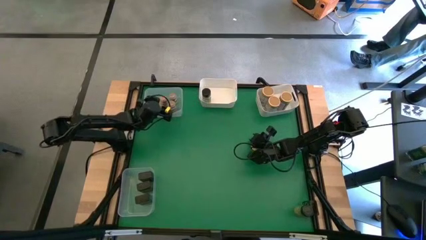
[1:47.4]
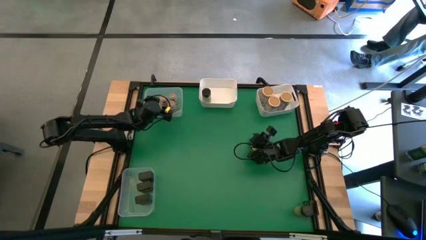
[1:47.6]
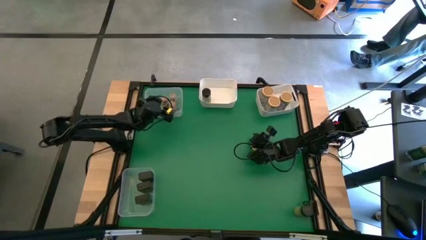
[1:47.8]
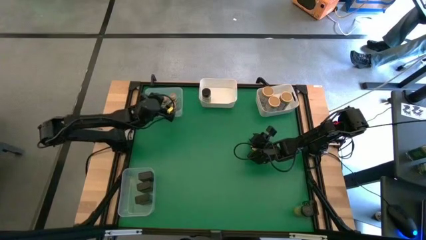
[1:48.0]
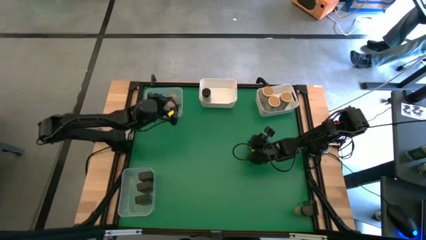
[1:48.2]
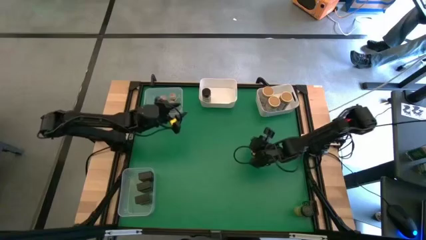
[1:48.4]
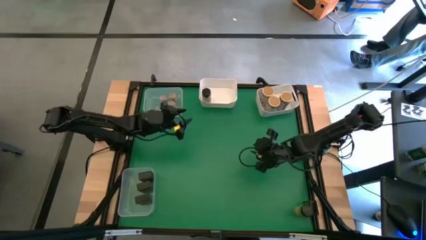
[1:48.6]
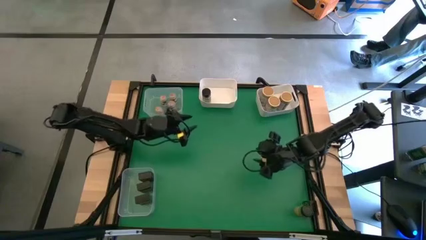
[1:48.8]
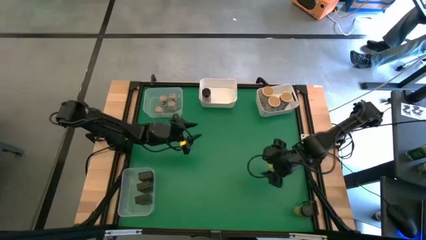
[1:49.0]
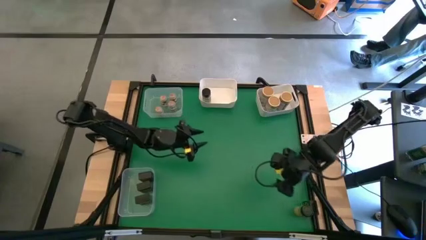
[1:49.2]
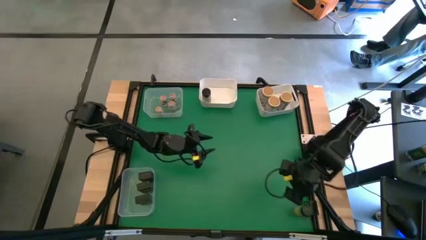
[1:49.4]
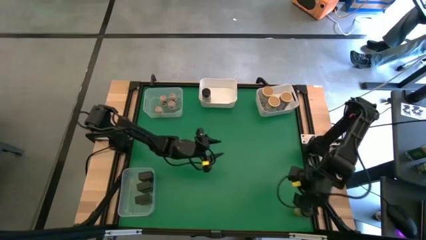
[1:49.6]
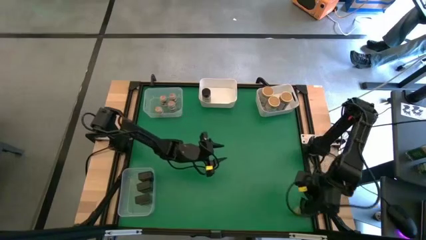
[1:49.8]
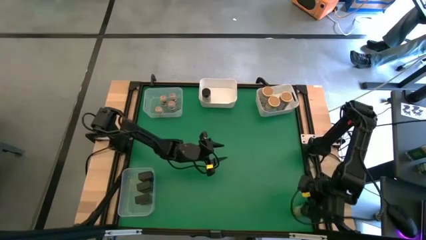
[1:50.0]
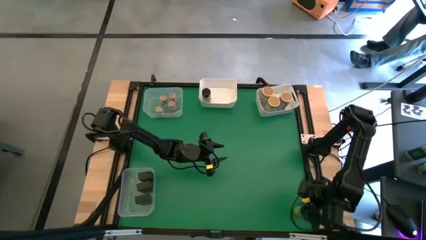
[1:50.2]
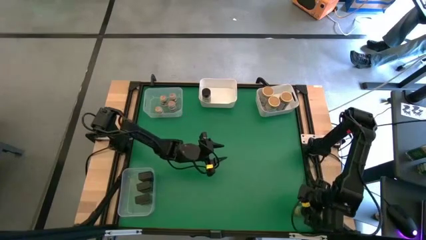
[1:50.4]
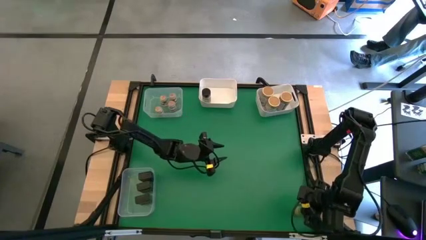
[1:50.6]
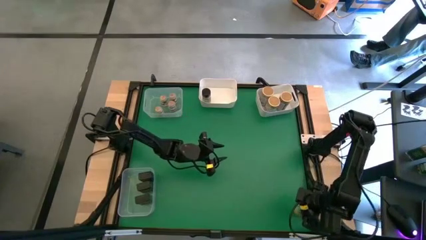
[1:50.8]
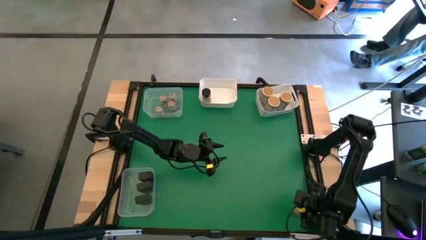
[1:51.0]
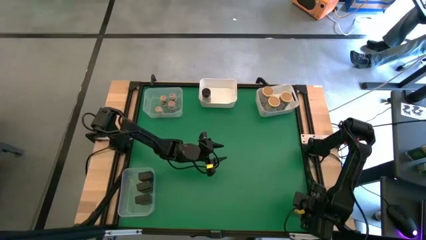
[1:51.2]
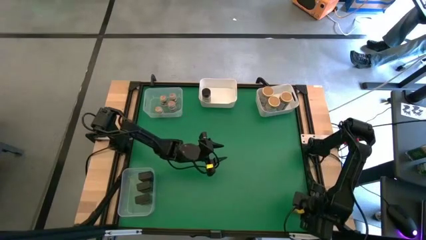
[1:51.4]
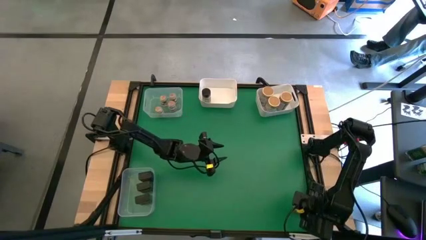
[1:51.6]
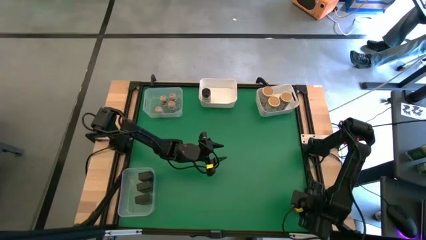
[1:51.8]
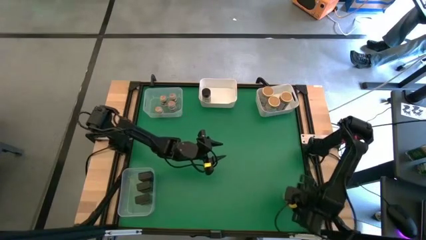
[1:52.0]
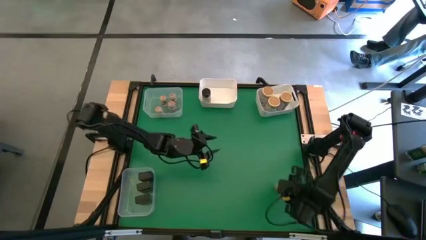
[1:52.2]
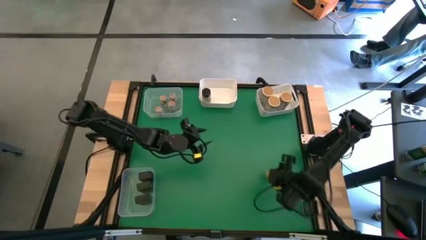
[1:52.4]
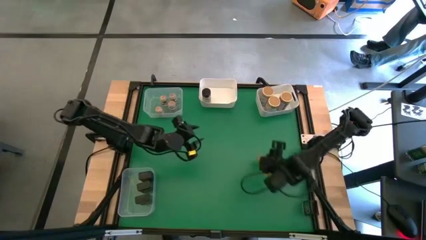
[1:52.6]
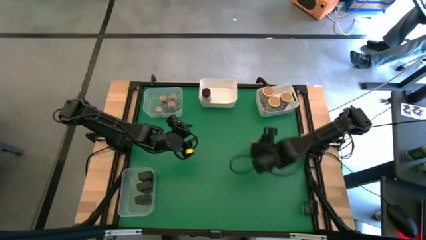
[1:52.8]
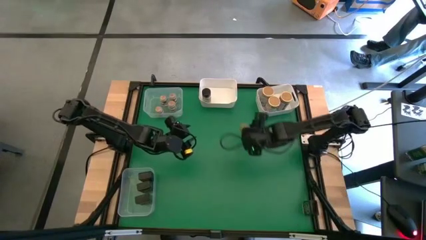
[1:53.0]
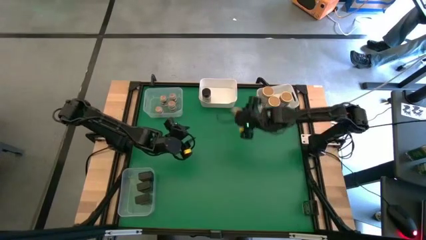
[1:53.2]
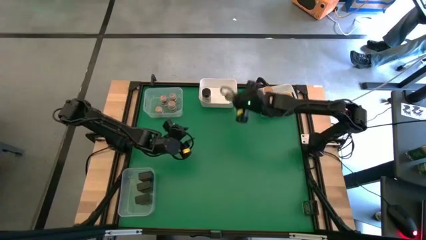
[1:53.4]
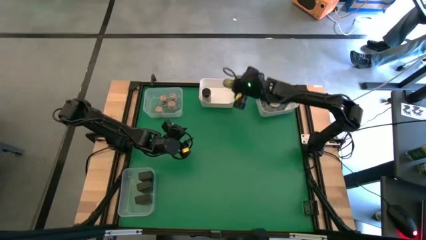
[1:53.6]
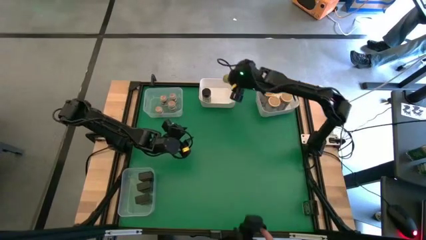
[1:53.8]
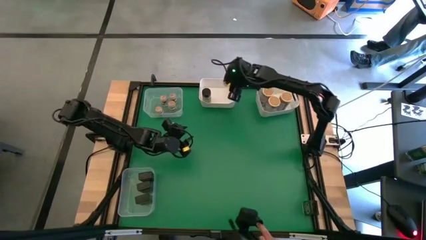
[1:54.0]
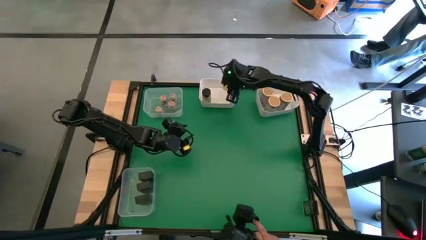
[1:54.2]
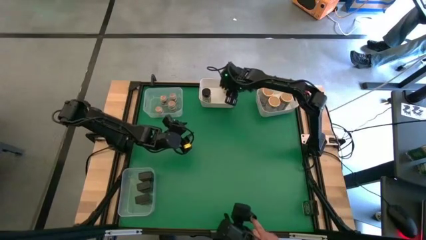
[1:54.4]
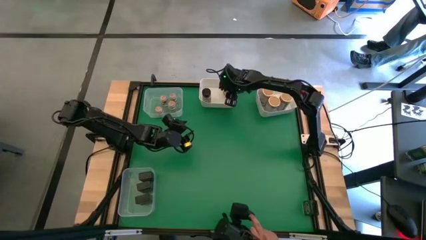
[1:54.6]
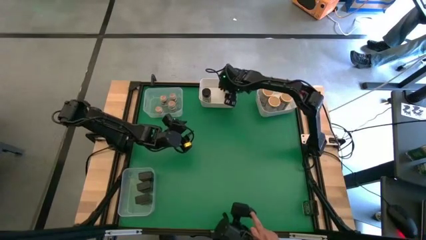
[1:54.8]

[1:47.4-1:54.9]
Task: Sort spices by type
Put the black seasoning bottle into the left white bin

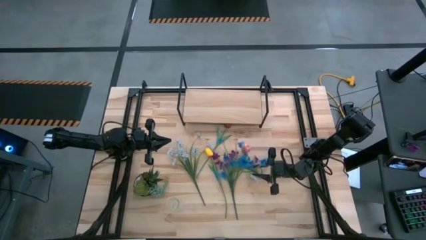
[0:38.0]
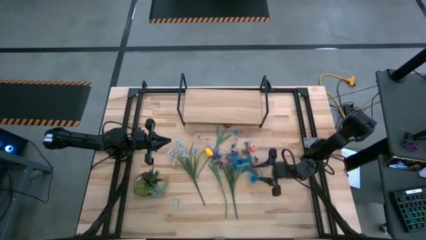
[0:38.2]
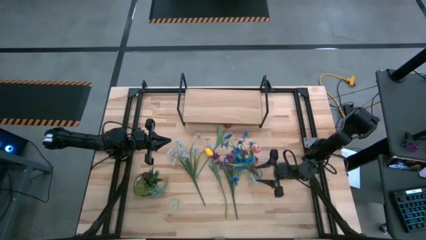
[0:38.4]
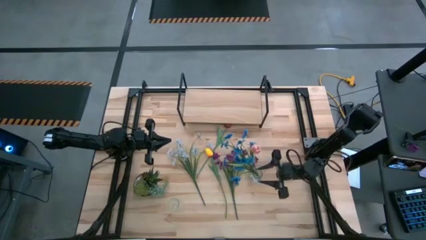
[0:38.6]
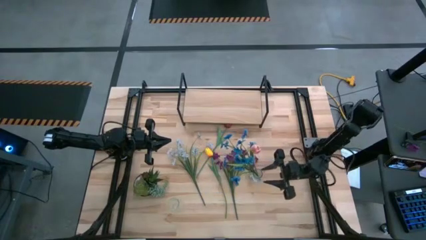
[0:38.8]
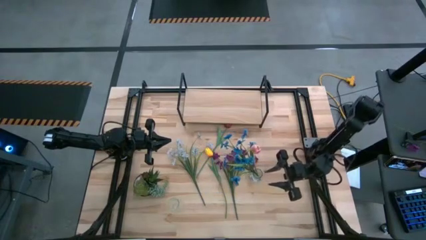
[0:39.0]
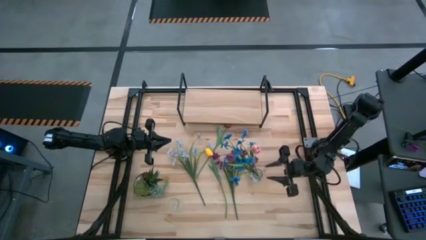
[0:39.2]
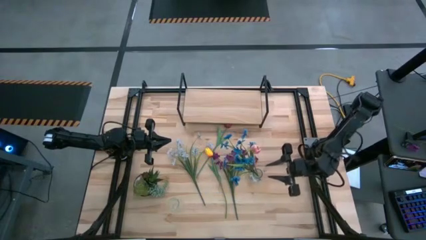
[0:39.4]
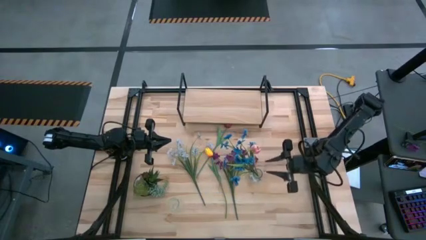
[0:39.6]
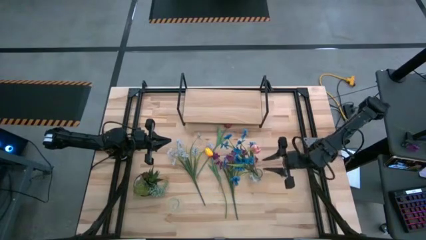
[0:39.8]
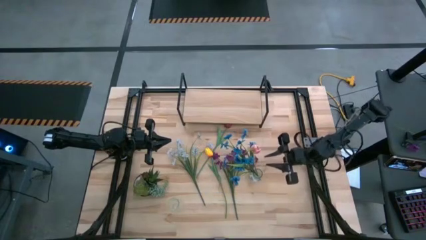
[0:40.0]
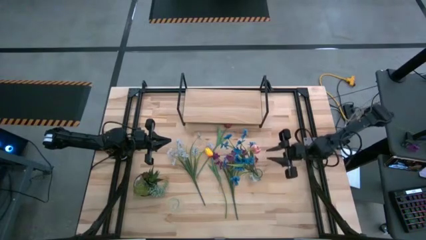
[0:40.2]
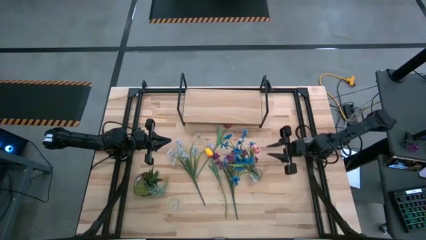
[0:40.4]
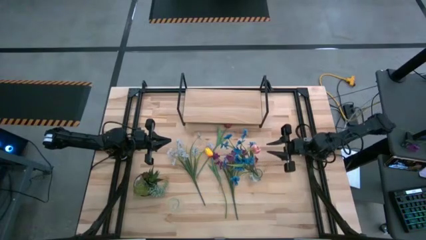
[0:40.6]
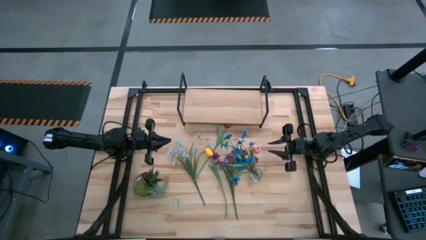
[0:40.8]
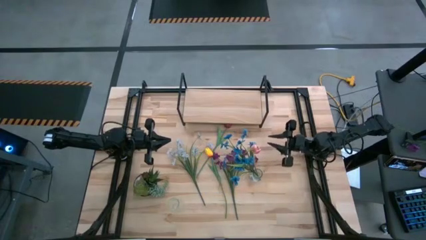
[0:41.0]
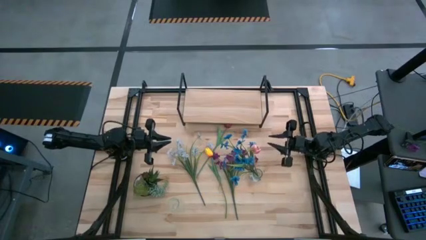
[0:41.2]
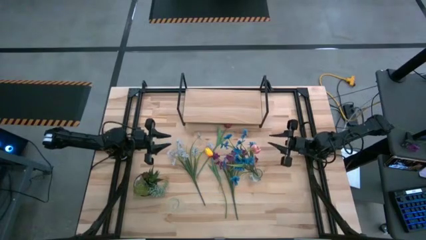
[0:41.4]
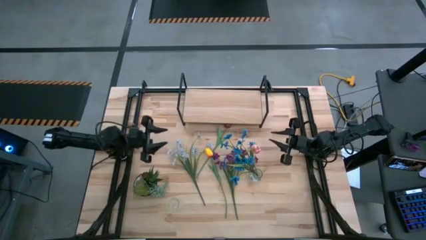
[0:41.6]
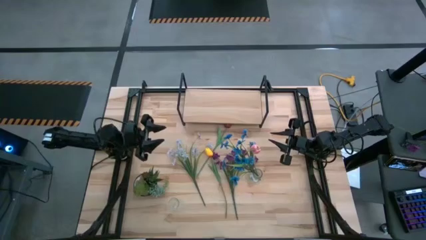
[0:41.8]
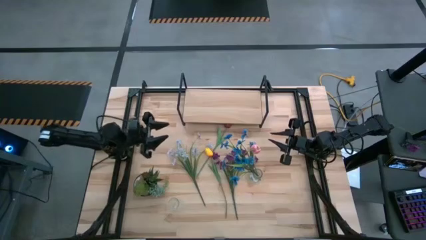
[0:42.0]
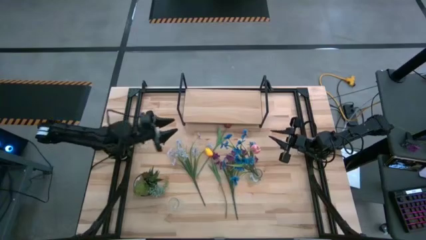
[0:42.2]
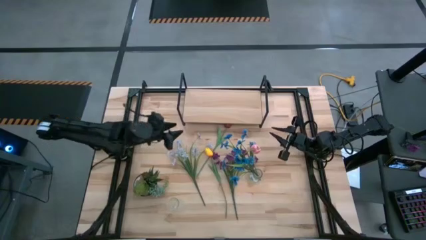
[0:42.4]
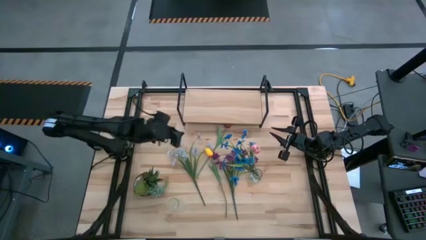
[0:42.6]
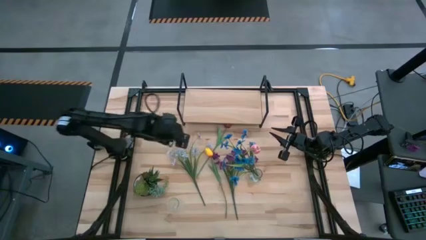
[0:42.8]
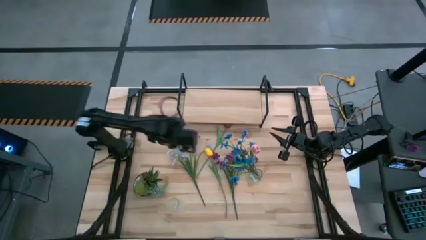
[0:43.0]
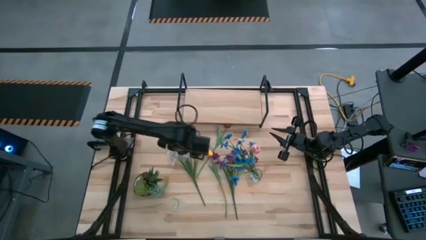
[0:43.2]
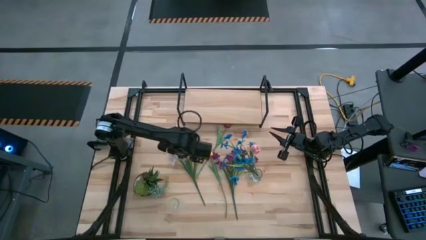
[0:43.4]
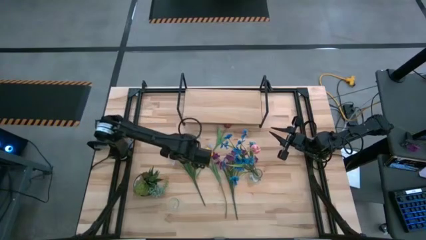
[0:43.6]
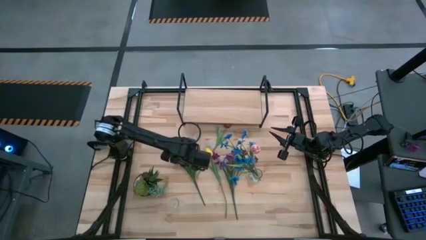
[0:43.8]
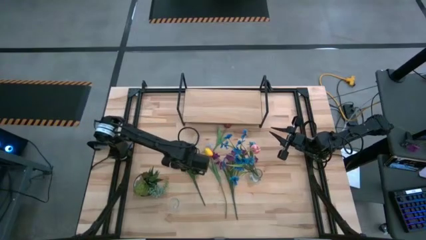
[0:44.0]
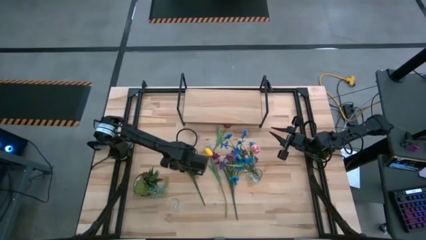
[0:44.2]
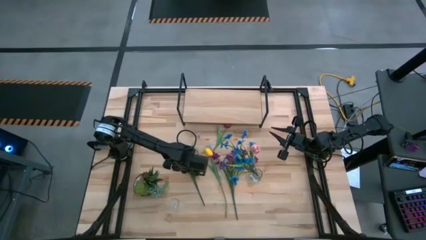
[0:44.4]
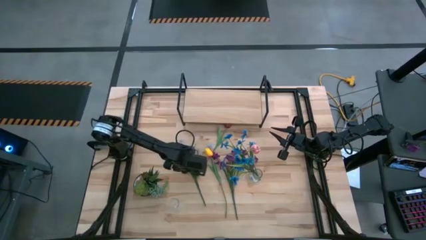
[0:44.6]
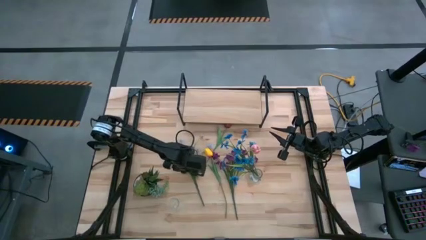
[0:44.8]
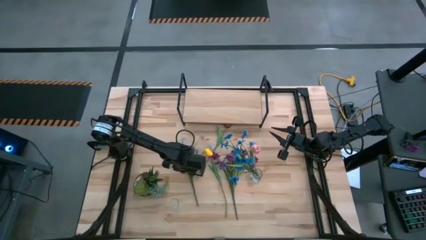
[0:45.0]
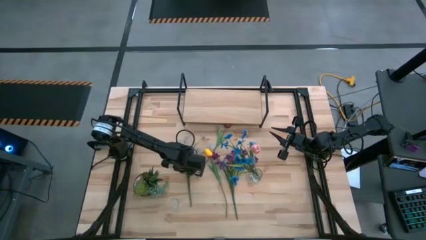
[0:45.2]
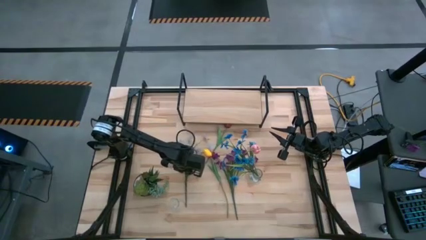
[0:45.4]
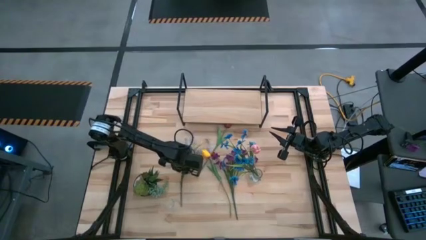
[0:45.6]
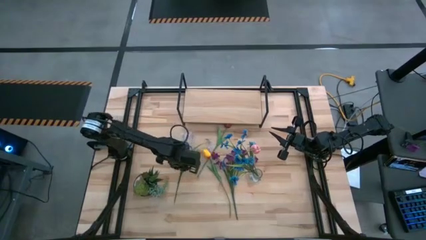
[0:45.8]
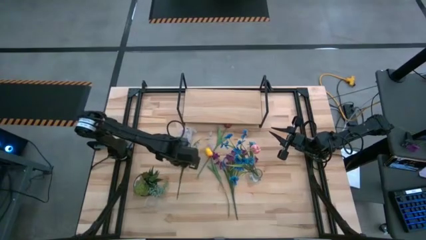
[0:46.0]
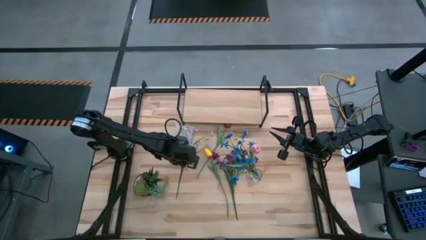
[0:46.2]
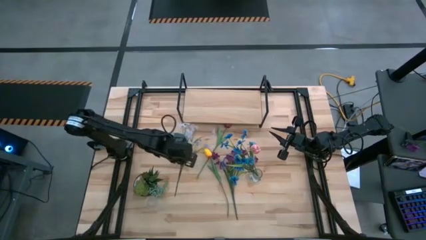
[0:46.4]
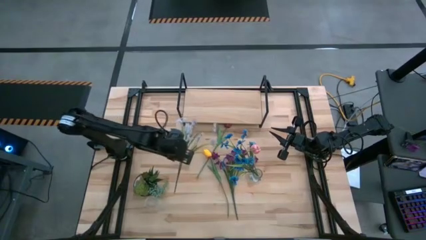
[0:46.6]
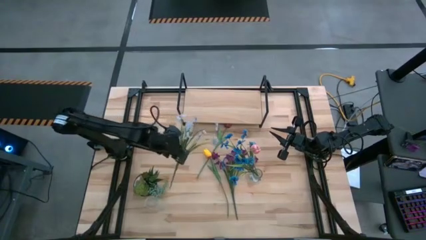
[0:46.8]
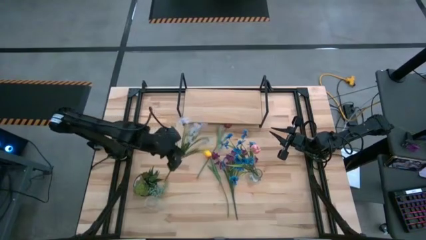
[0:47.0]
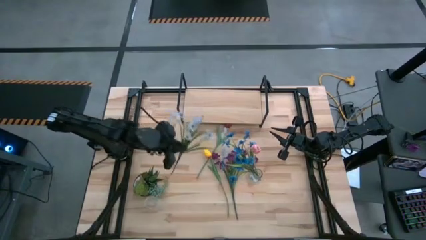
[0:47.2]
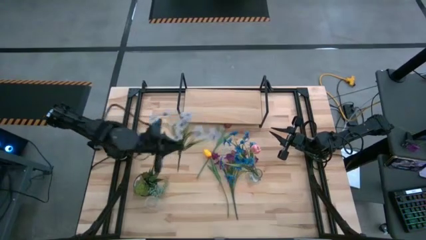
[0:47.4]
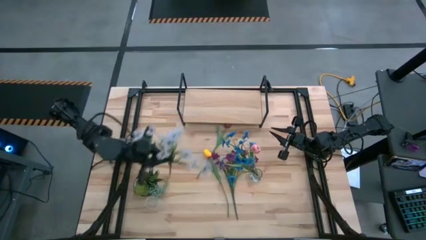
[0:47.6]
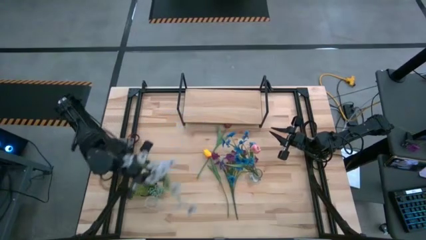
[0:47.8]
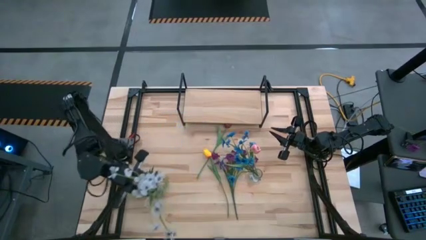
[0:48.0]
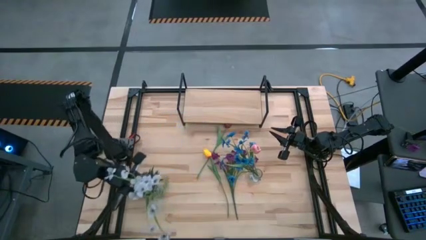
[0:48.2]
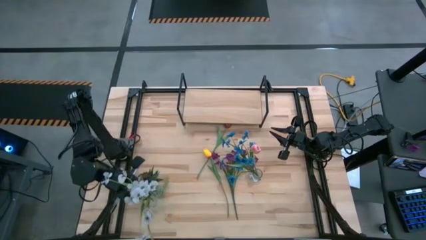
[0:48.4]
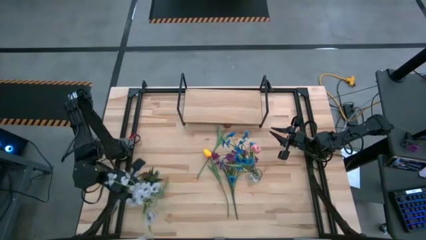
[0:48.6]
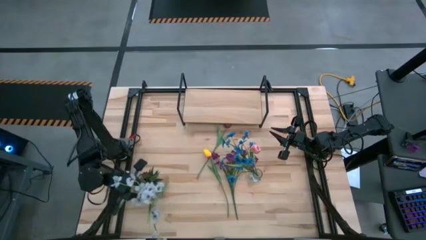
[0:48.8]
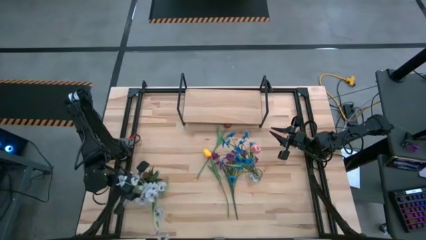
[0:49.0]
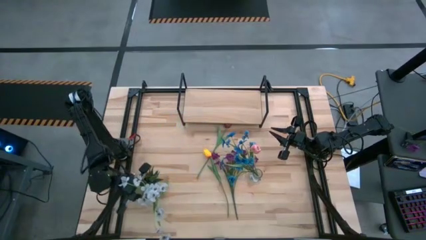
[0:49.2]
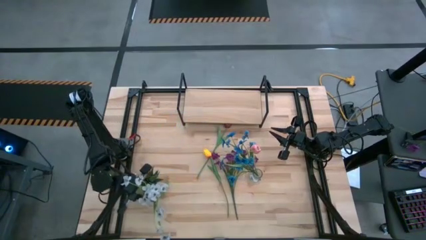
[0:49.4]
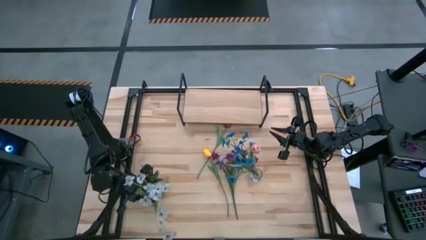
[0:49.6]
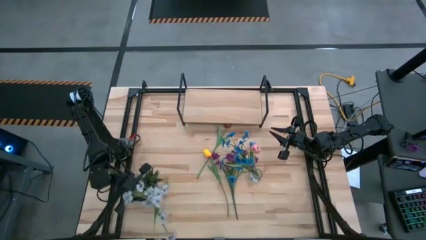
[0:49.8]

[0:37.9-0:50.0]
Task: Pick and place flowers into a vace then onto a shelf
Put the white flowers into the left transparent vase
